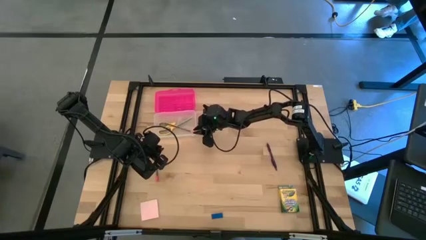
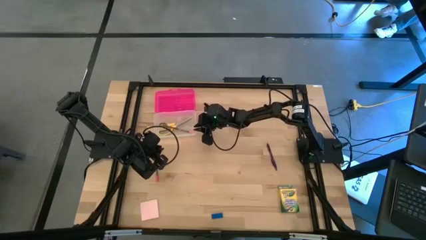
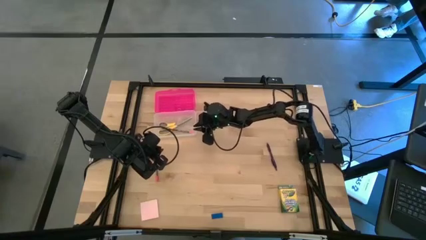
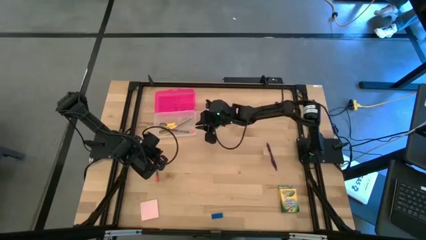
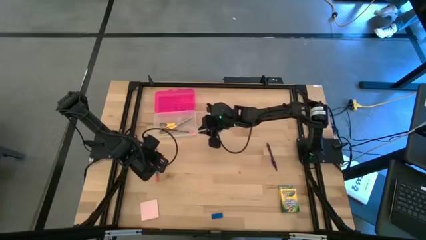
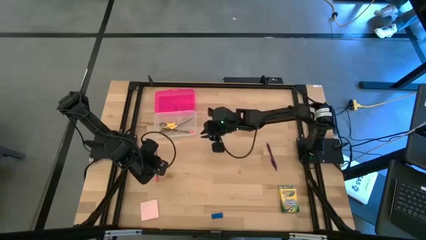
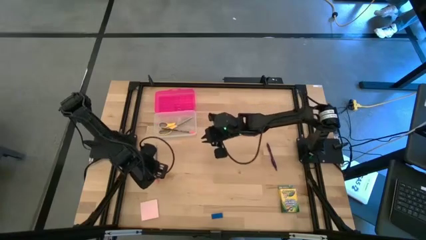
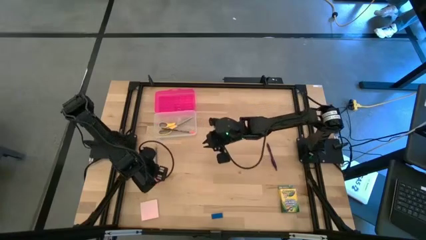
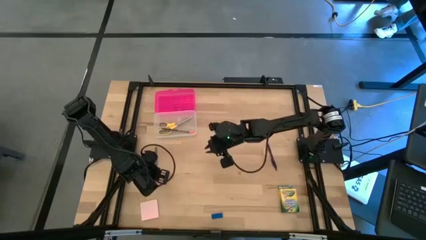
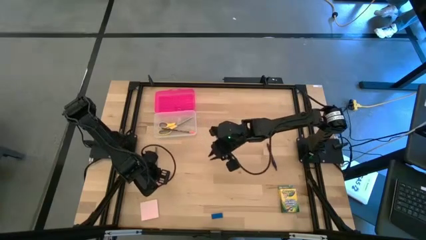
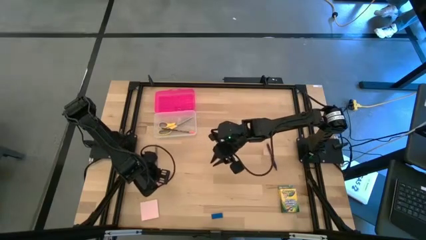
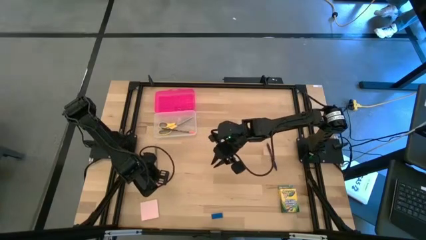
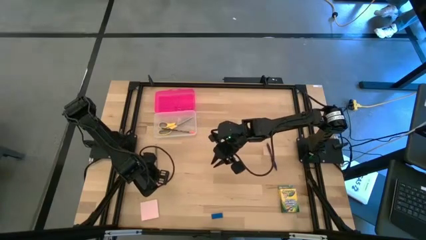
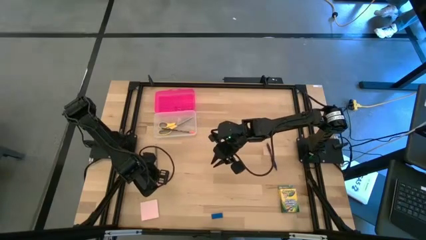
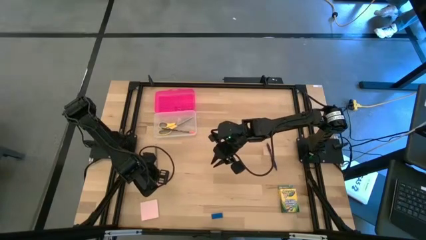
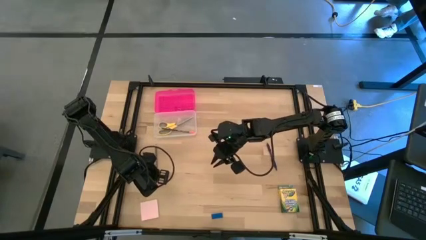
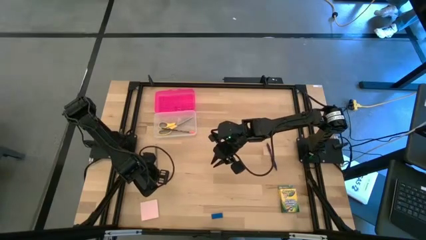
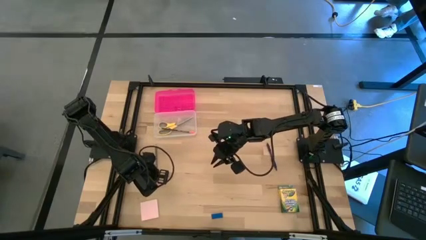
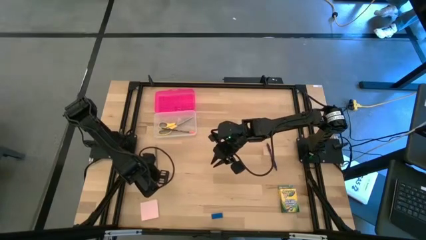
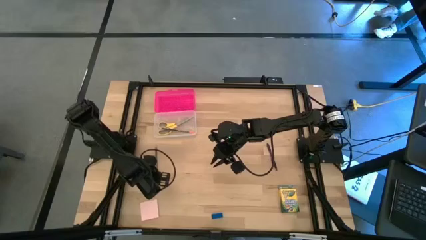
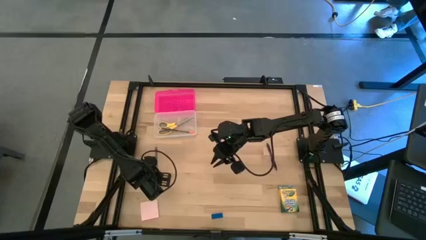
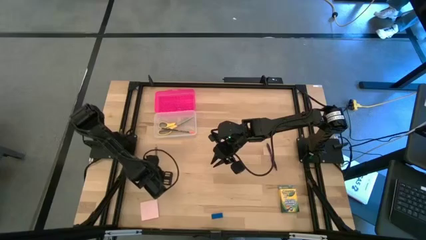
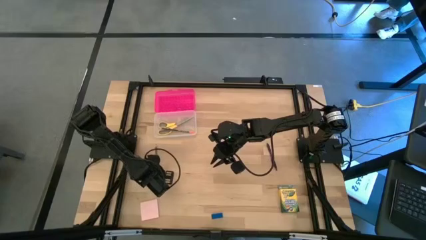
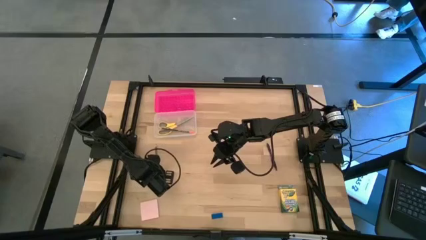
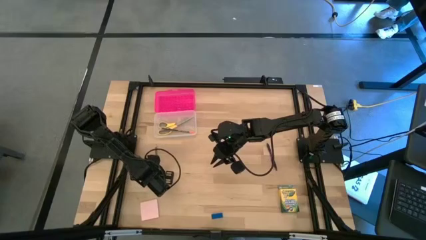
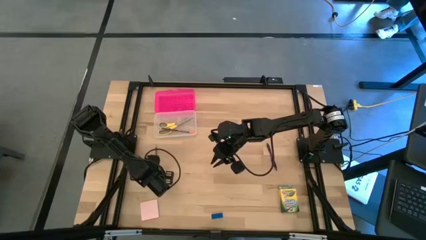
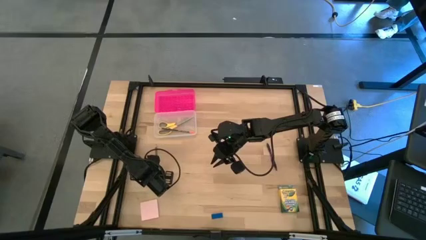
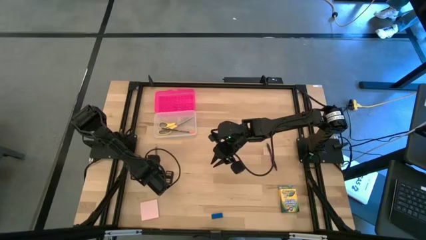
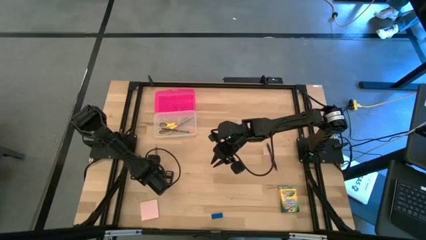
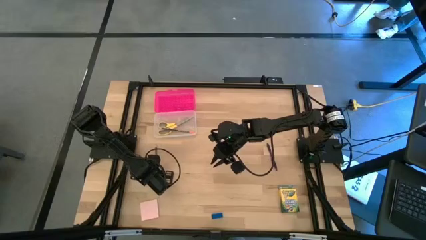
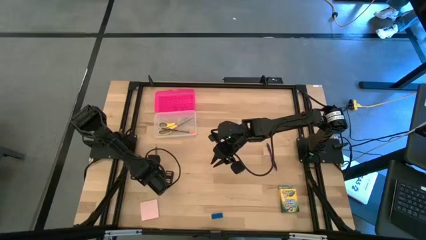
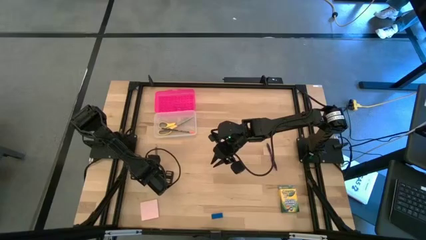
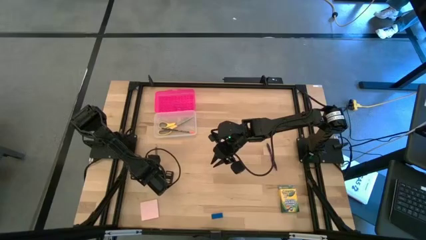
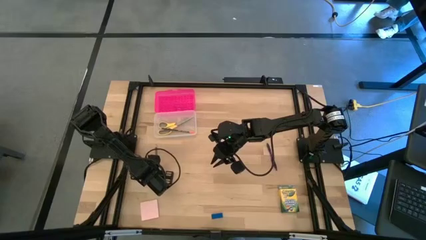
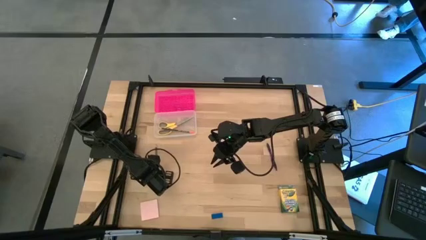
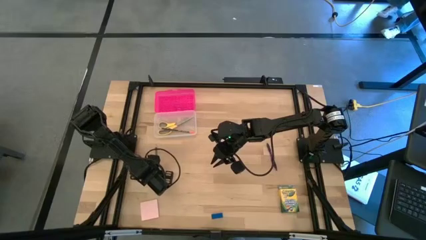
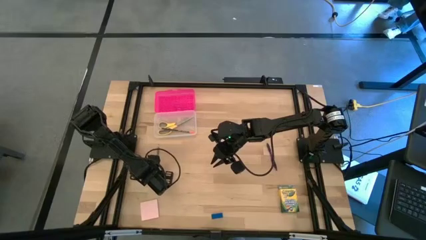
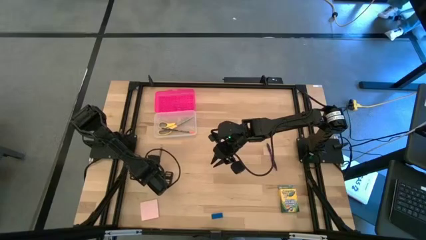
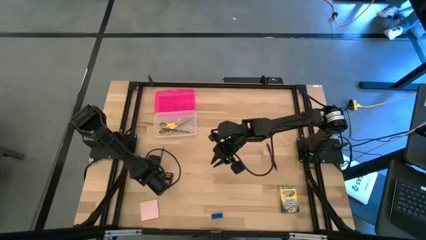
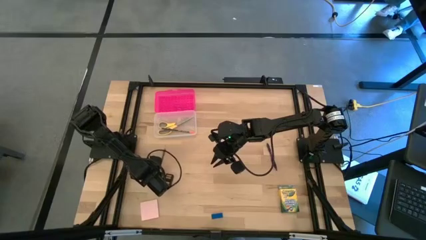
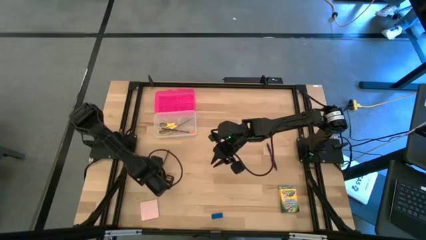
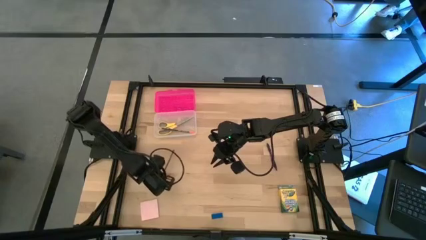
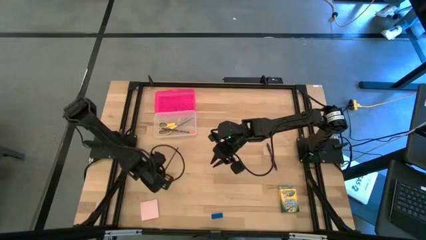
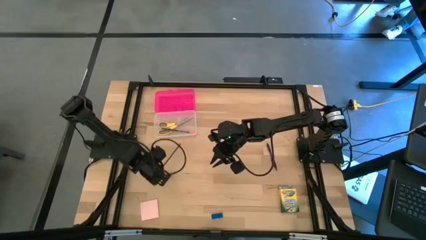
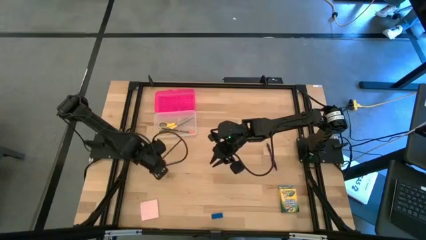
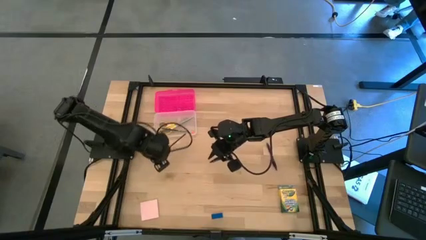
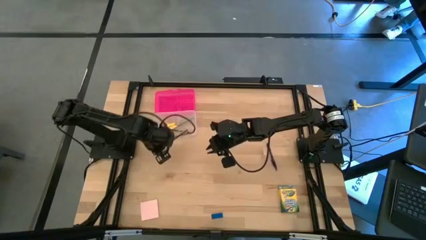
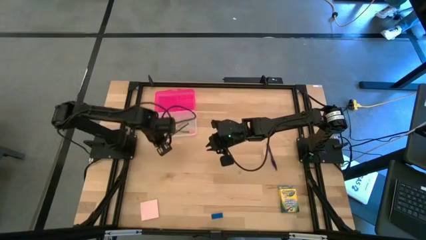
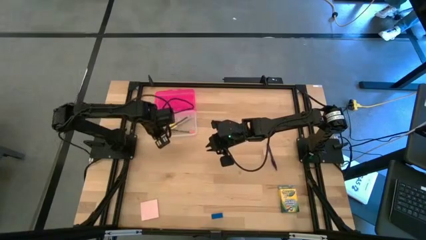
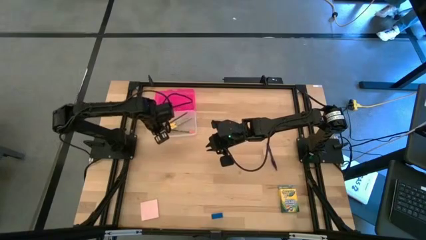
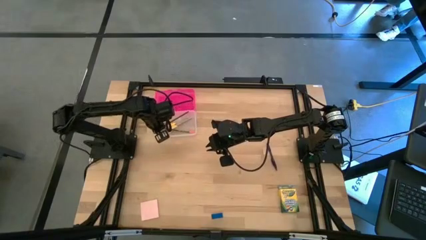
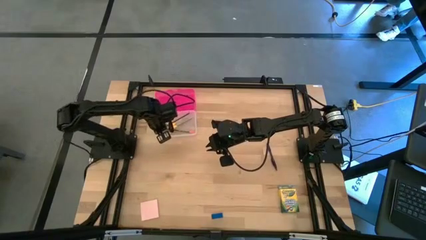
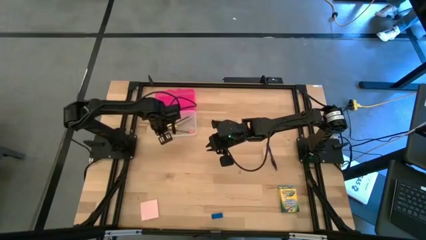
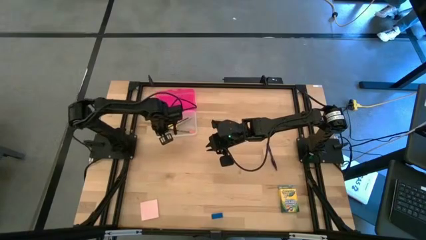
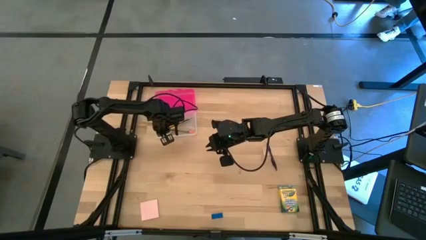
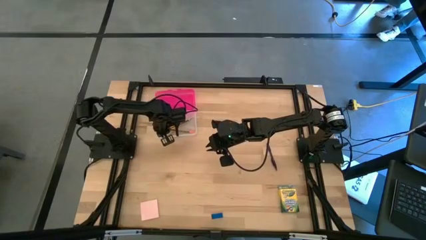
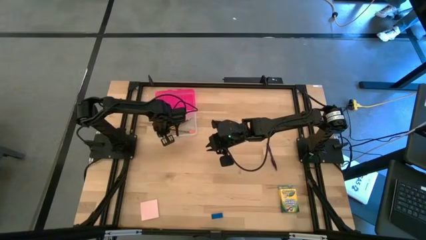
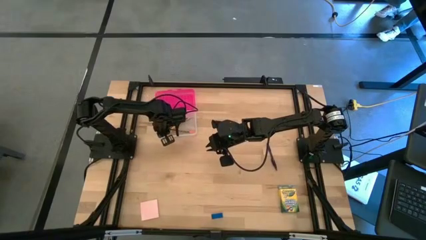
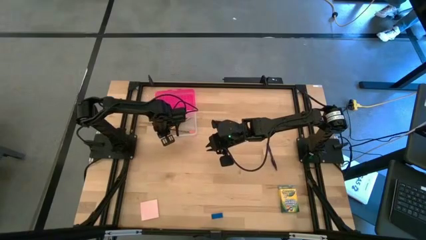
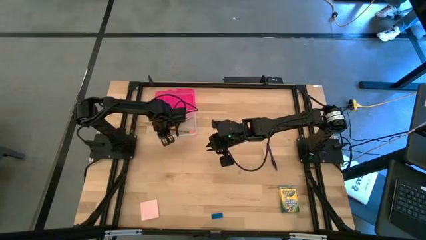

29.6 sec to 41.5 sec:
Task: Pack school essentials
Put the black pencil into the pink supply box

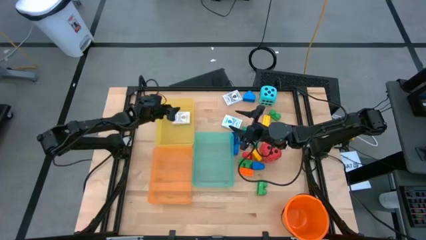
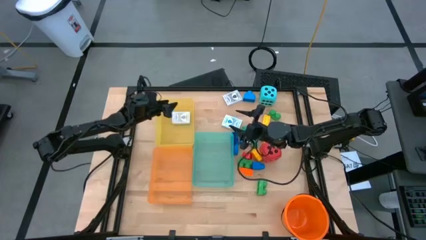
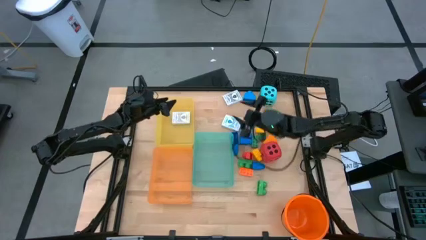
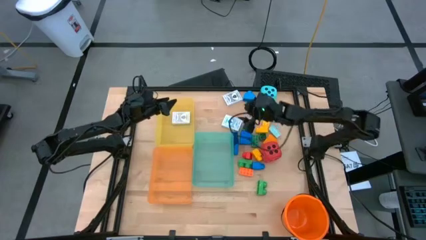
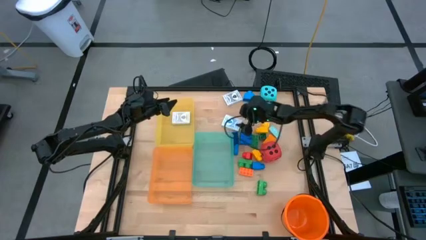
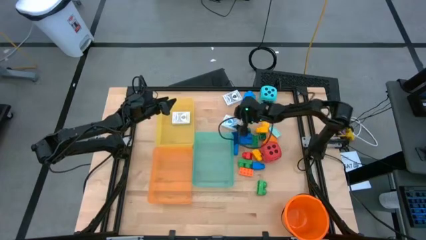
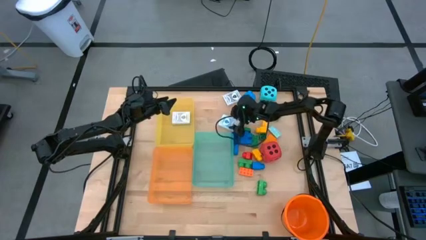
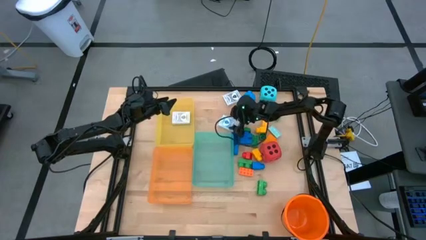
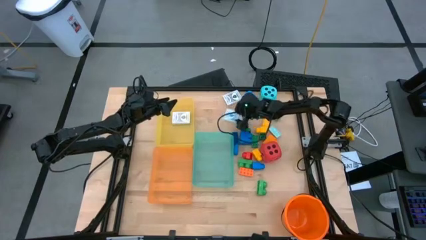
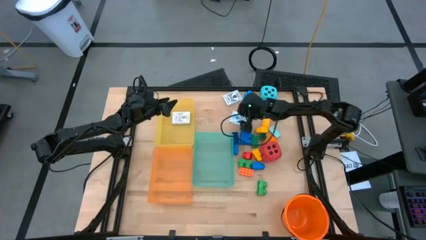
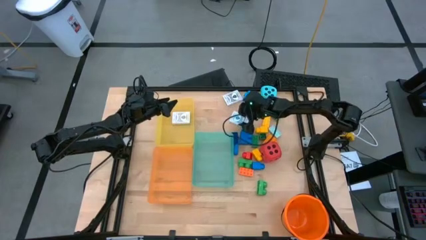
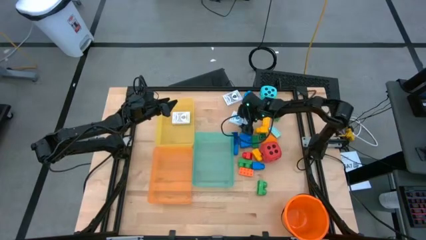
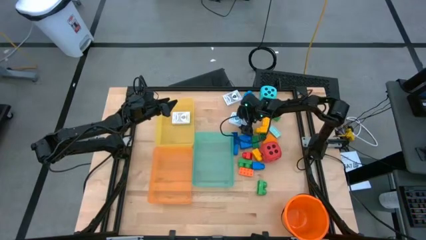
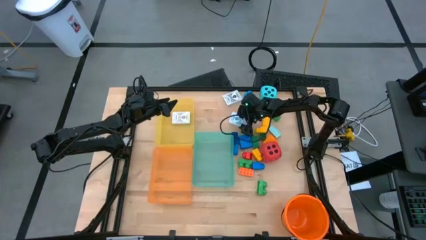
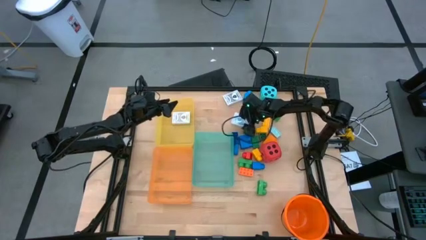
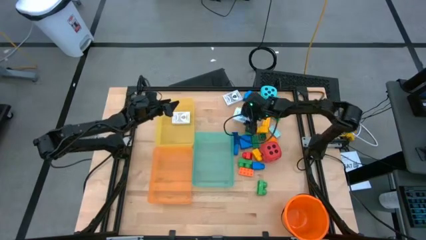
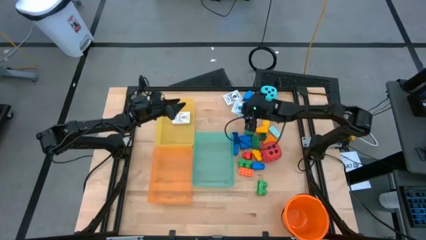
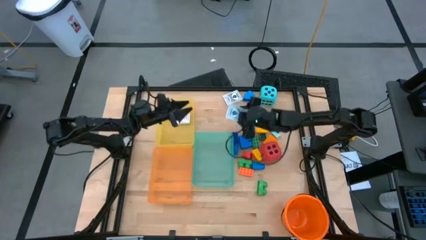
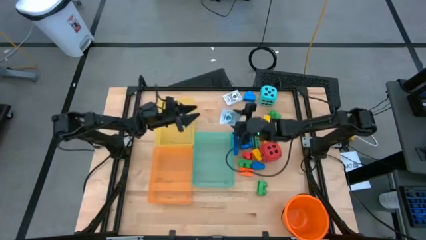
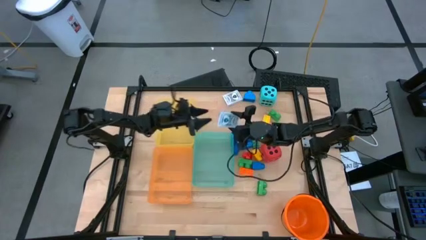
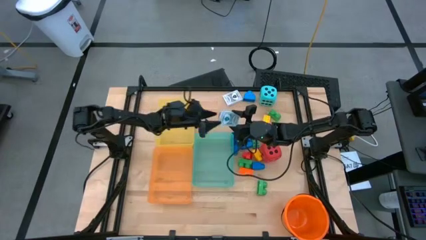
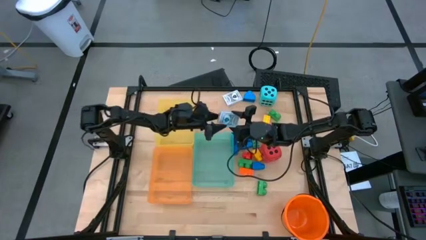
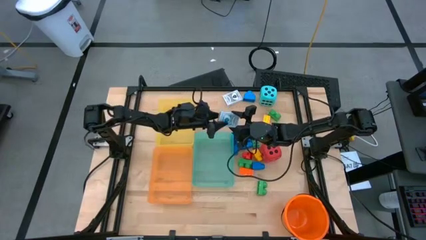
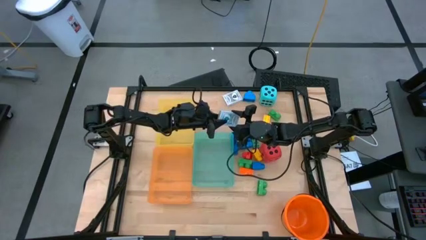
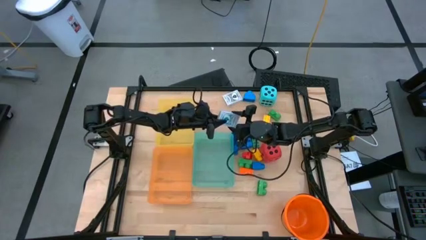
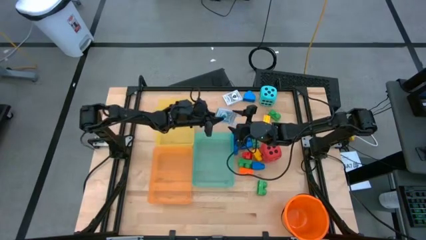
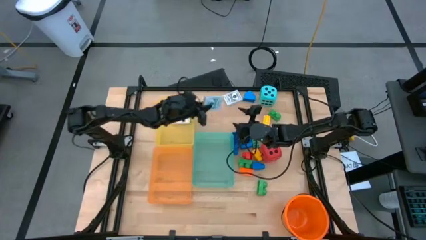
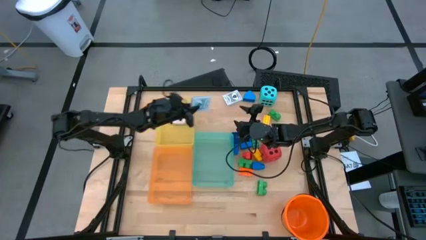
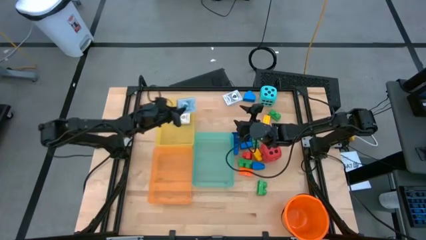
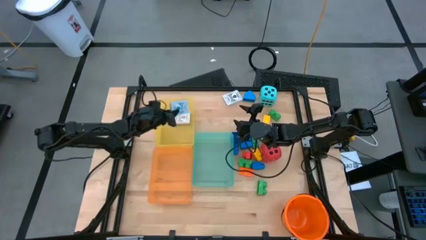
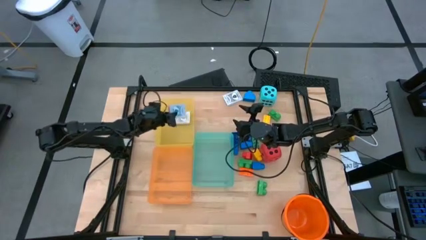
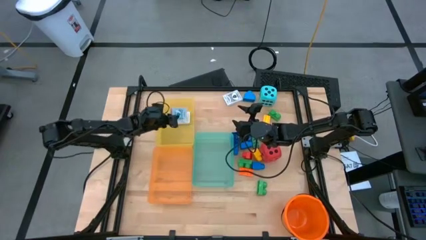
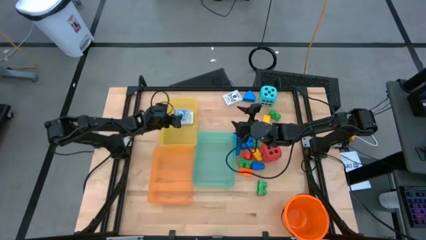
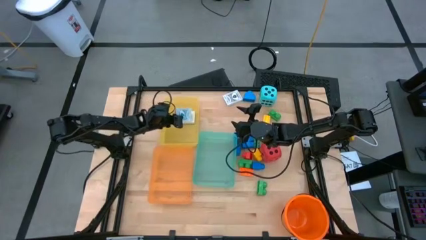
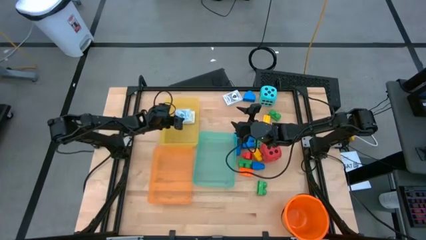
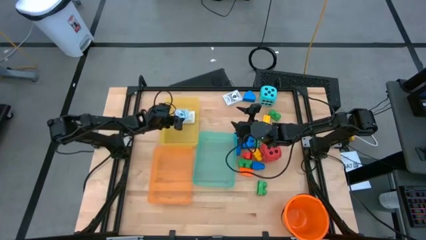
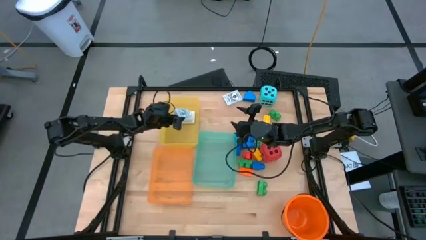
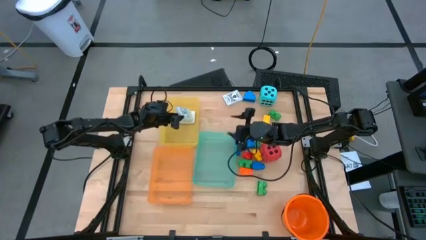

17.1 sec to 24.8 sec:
Task: Pick & Place Toys
Put the blue deck of cards into the yellow bin
